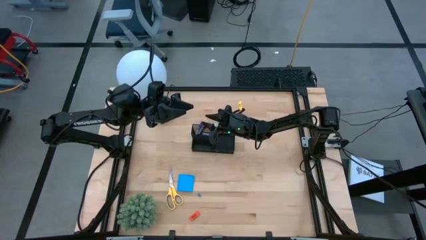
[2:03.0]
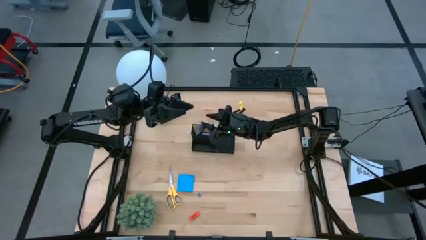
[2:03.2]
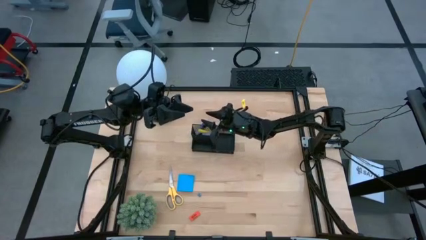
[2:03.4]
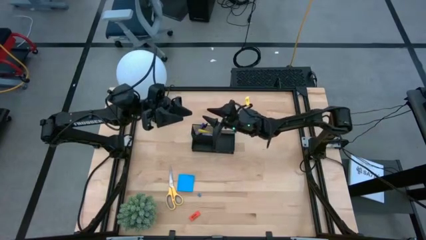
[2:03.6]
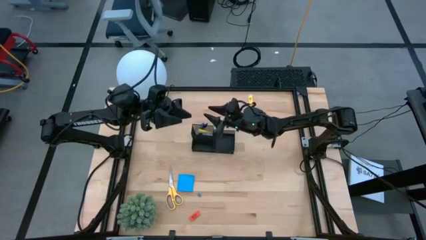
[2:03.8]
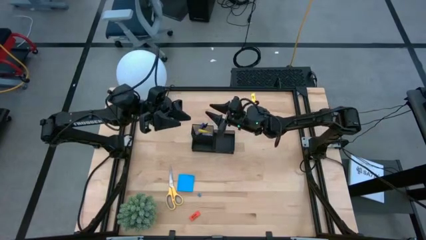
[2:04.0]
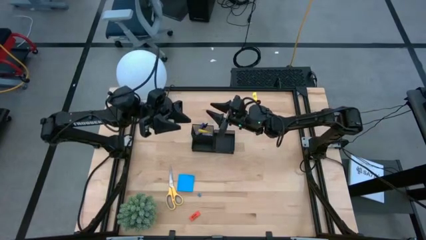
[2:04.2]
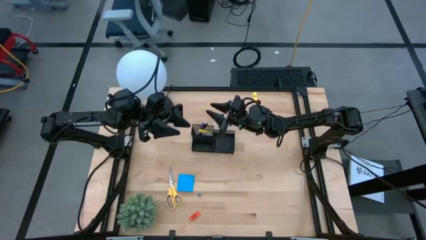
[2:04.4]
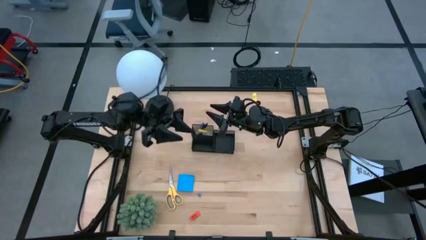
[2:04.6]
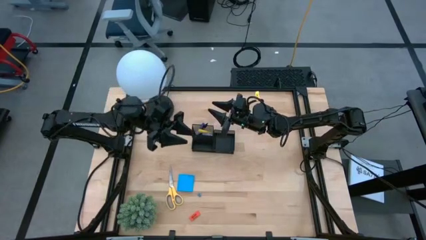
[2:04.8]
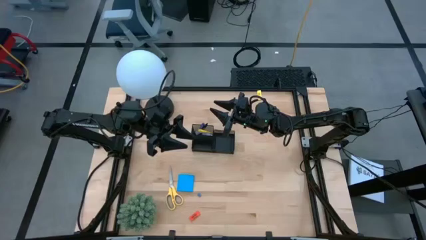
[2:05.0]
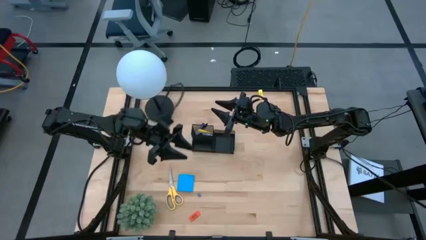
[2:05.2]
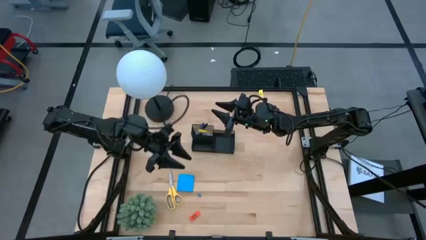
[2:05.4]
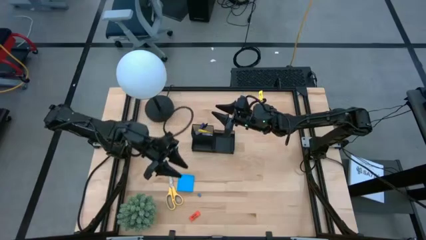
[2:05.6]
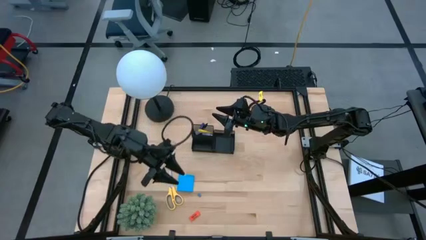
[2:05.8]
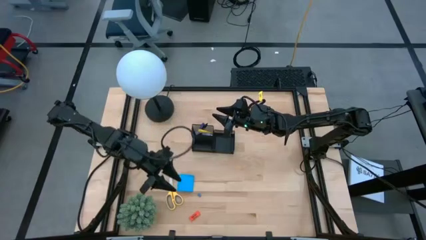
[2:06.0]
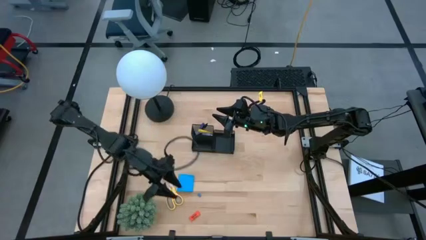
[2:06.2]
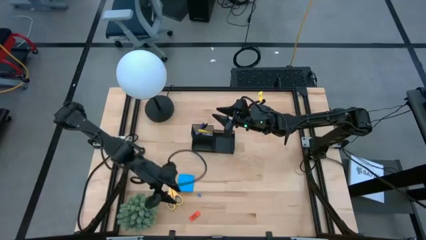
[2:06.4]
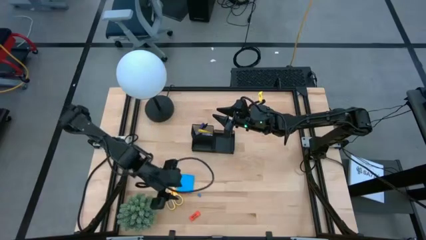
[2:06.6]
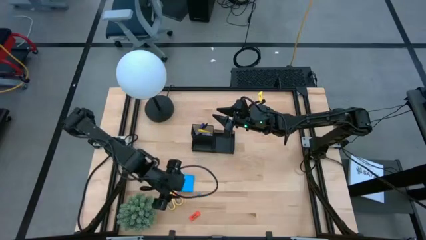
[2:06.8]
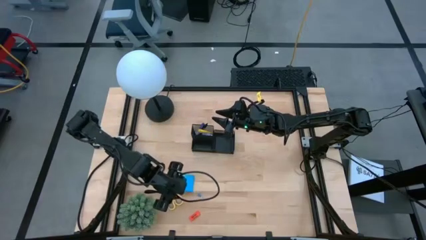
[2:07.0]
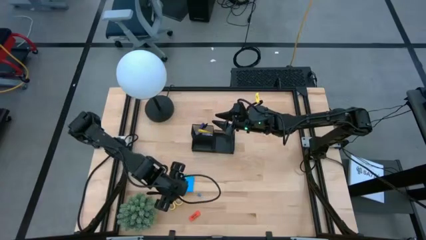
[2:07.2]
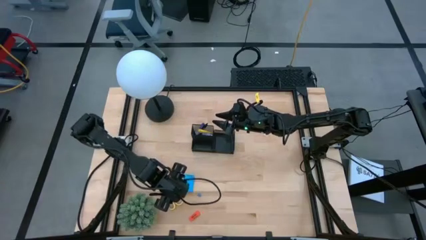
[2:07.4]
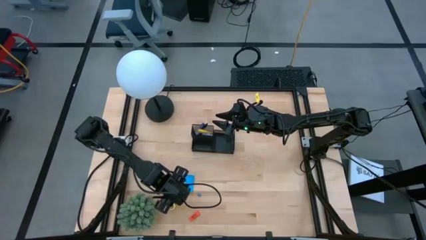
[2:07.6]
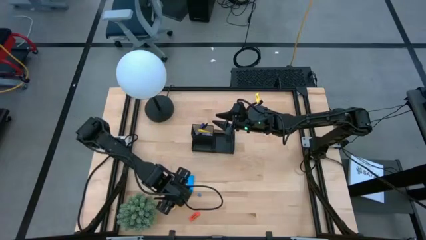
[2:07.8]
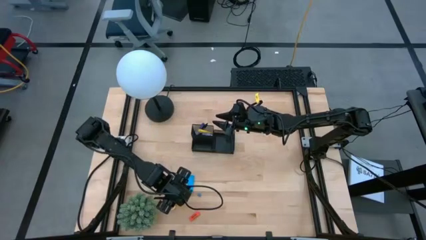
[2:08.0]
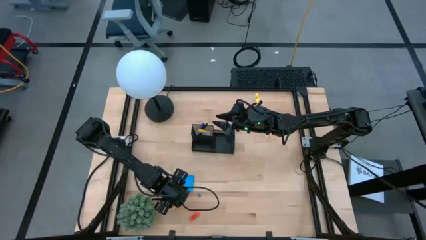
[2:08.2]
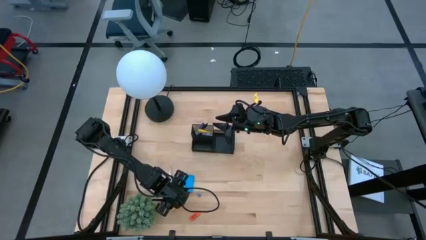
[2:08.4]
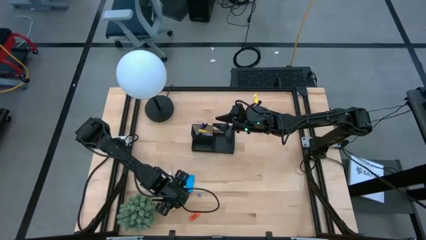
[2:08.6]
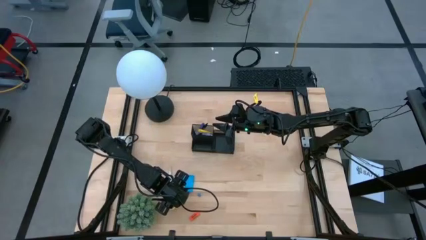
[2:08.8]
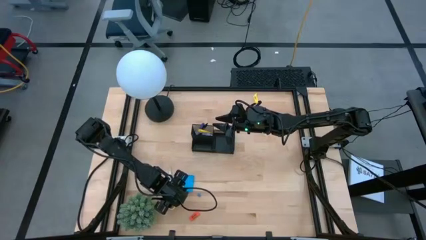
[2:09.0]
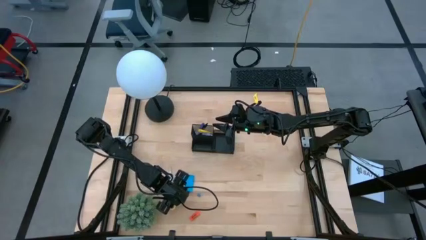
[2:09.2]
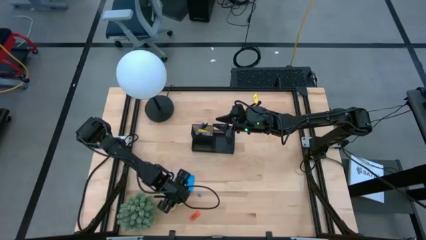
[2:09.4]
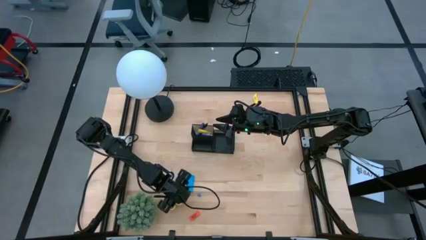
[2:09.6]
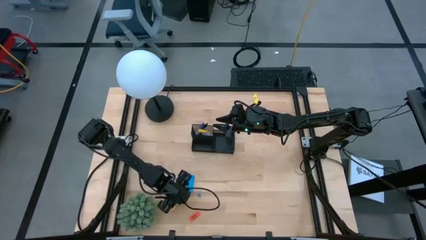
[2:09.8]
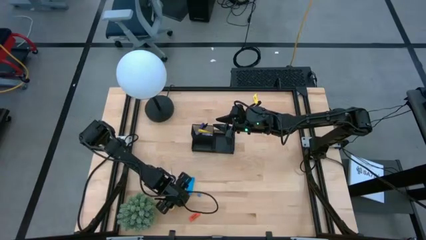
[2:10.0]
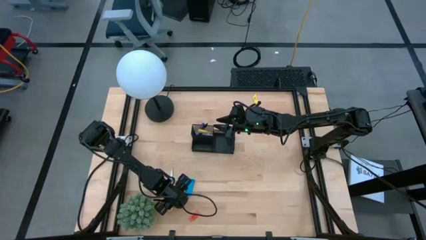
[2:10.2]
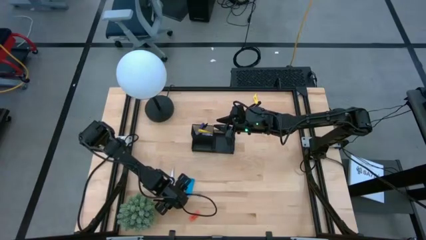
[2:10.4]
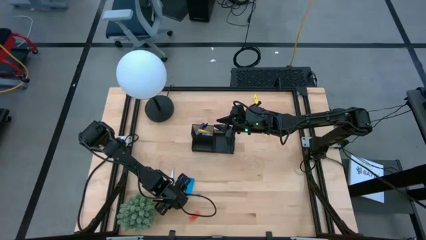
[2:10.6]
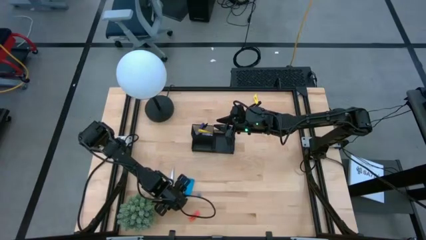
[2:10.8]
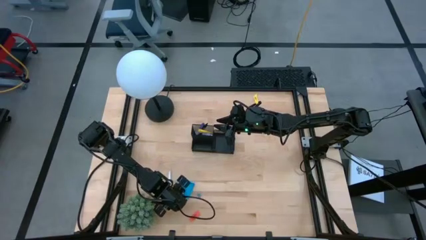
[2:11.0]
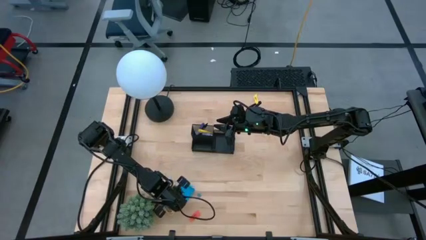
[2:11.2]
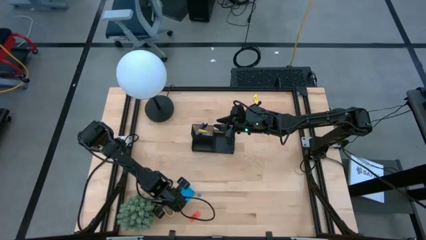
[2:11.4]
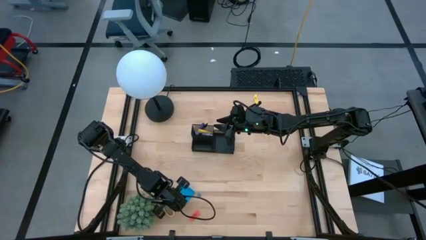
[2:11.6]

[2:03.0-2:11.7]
Task: Pick and place office supplies into organizer
Put the yellow scissors into the black desk organizer

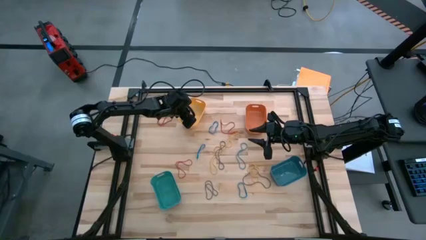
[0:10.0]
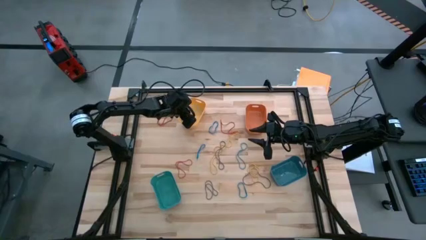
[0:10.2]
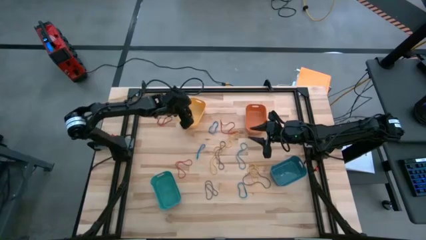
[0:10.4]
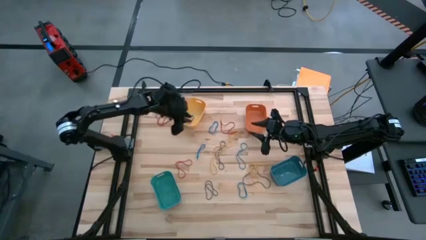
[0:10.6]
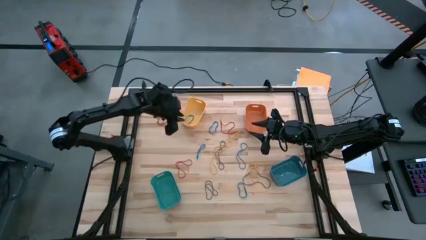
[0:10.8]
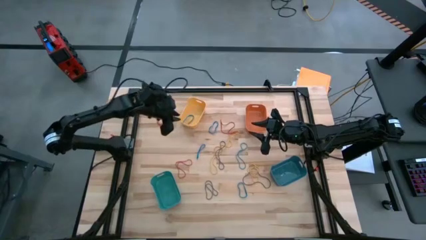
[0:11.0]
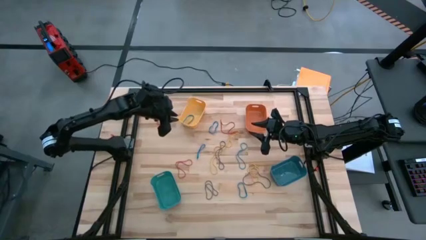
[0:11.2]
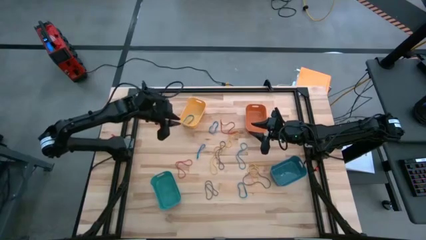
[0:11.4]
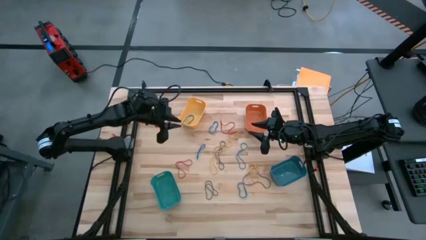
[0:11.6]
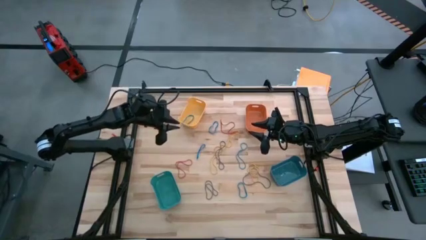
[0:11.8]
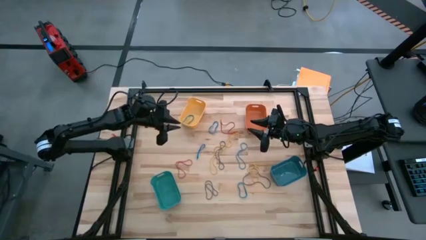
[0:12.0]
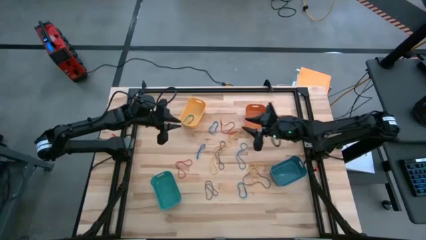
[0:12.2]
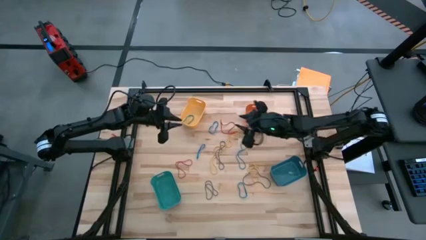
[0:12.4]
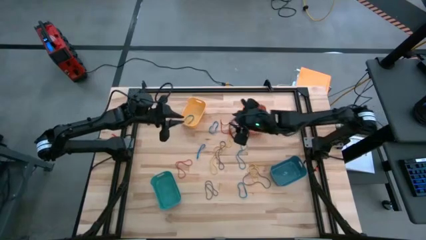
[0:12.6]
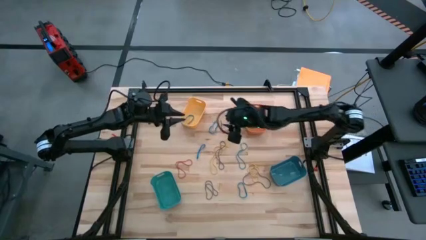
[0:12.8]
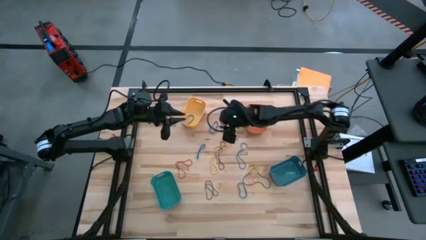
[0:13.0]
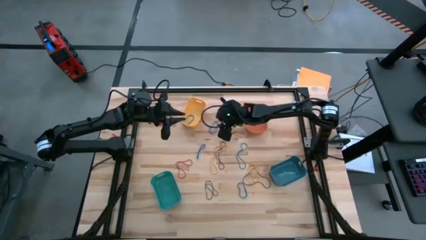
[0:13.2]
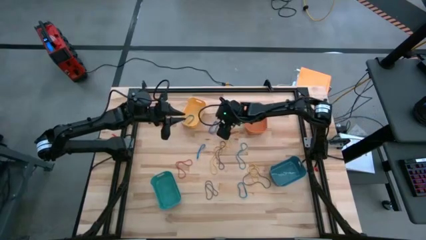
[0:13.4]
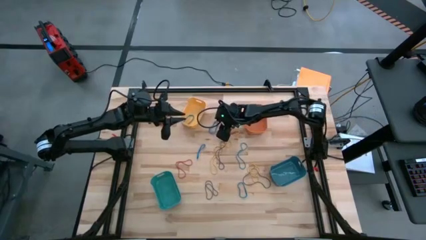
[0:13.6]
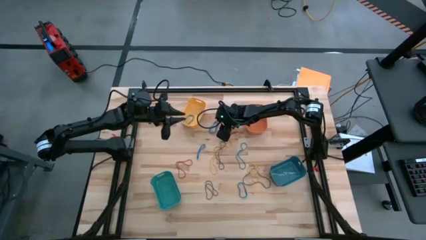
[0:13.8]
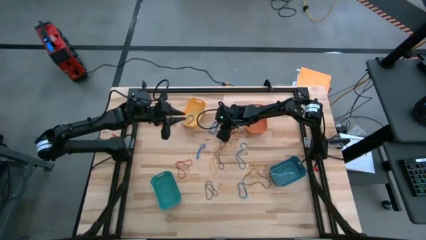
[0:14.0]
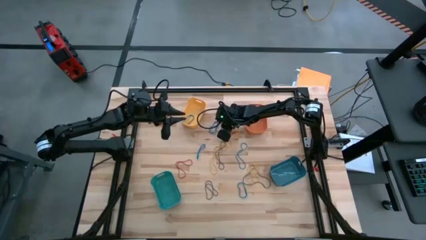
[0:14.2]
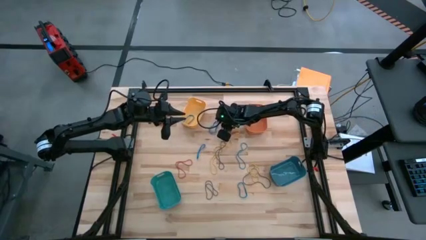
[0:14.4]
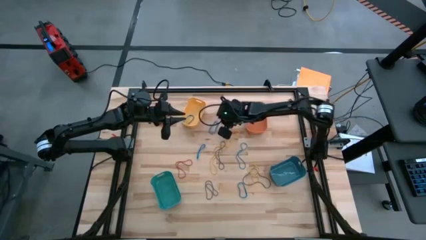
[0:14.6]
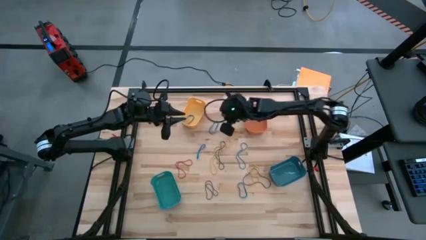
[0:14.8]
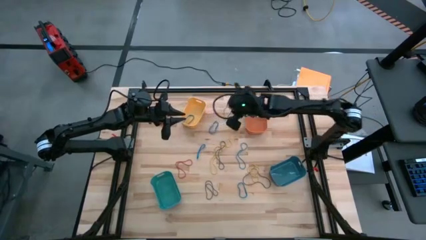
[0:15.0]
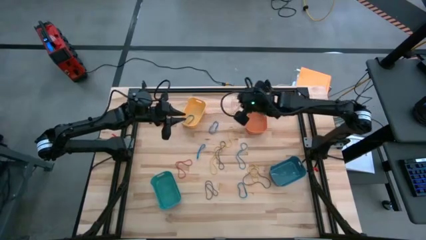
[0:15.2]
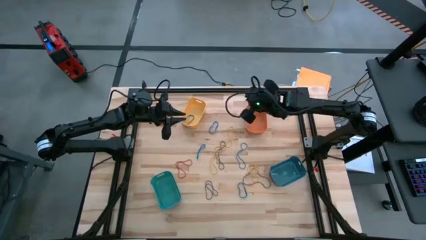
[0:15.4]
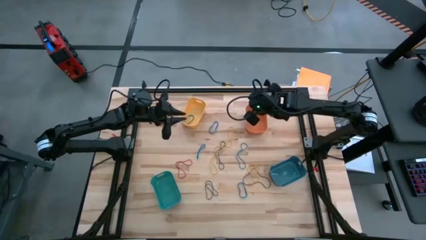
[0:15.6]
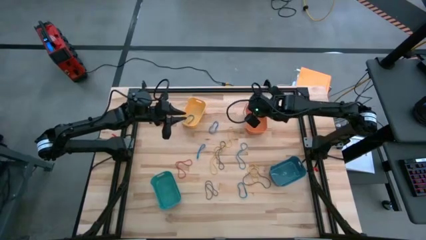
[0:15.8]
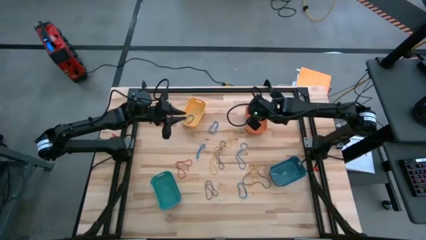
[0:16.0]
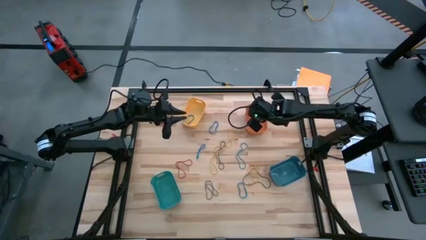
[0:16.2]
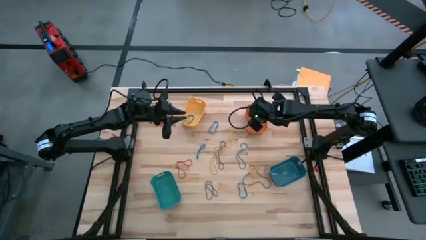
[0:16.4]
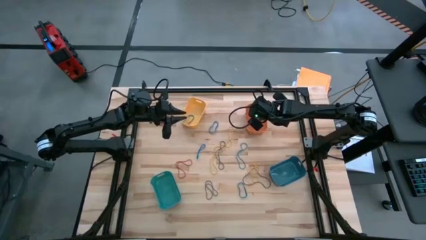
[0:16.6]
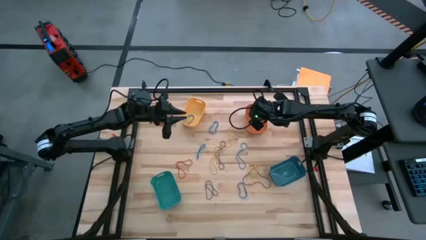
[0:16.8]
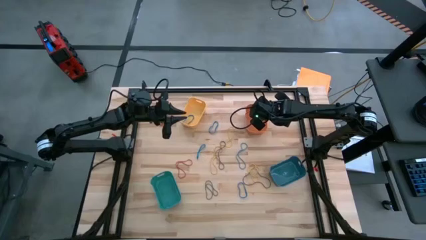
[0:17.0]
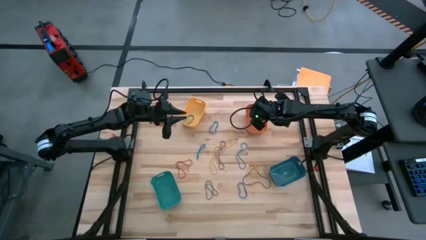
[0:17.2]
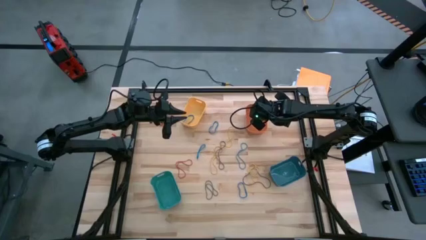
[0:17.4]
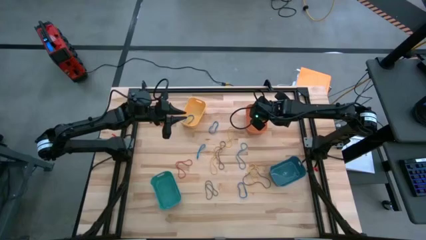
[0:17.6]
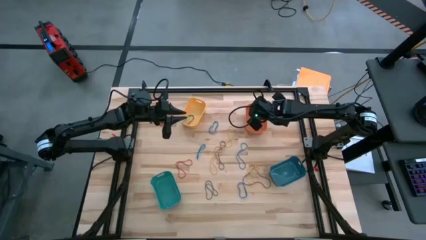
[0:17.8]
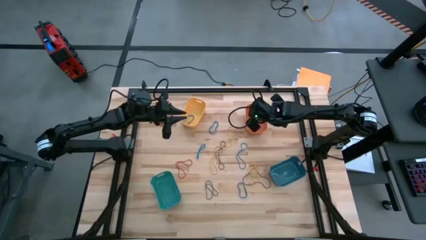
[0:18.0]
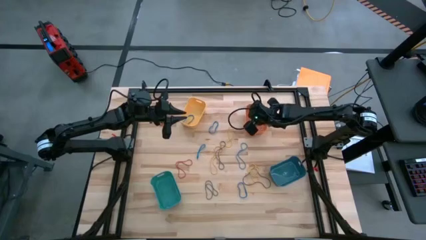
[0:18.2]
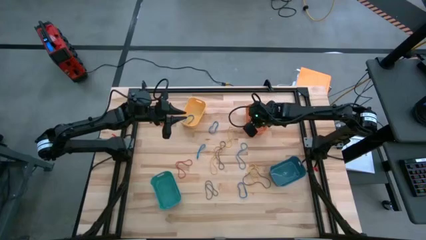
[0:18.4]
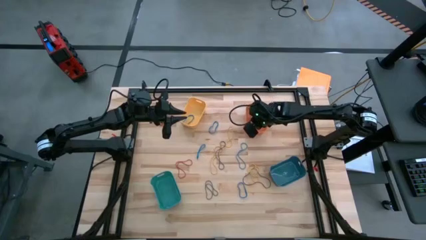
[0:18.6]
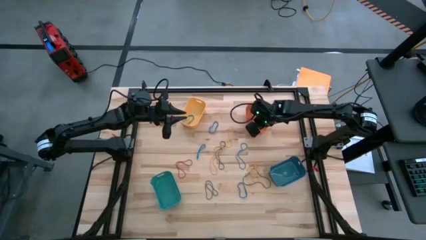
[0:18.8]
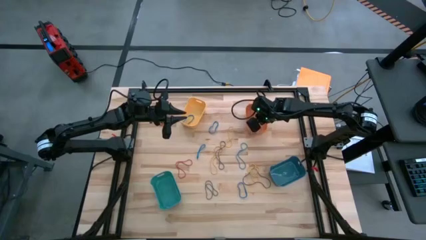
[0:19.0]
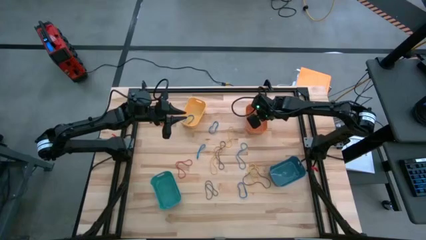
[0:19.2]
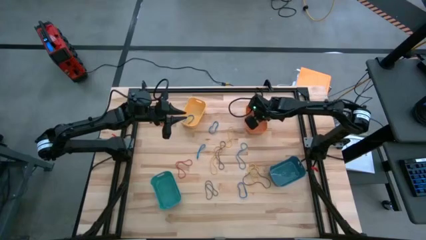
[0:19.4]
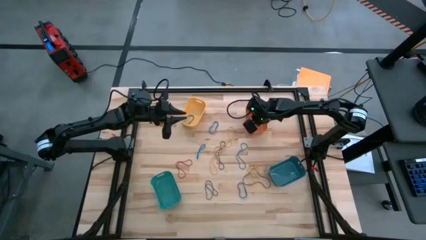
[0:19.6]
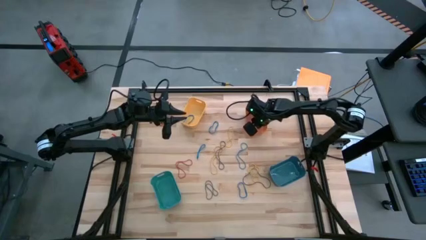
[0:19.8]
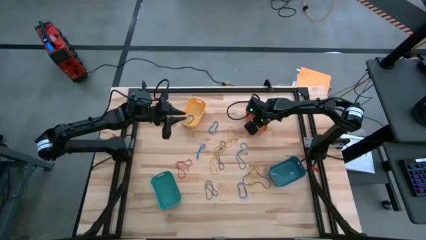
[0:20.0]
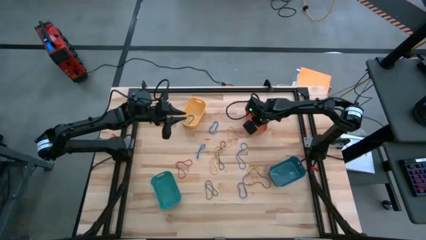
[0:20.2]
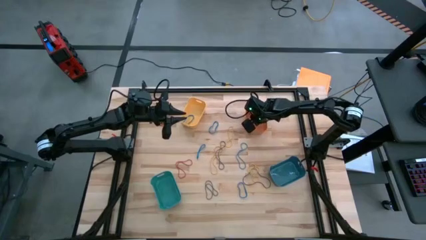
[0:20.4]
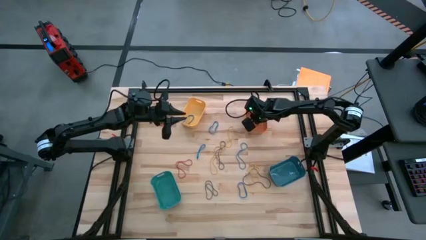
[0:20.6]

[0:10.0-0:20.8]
Task: Sort rubber bands into baskets
Put the red rubber band into the orange bin
